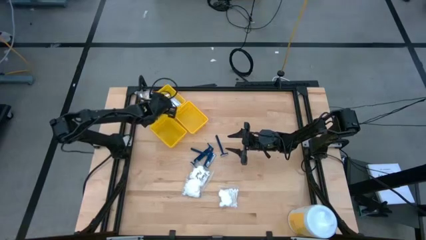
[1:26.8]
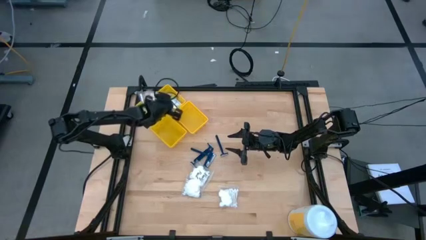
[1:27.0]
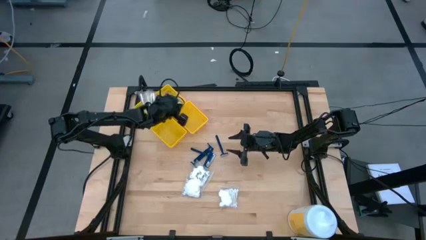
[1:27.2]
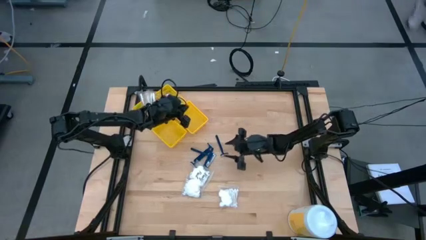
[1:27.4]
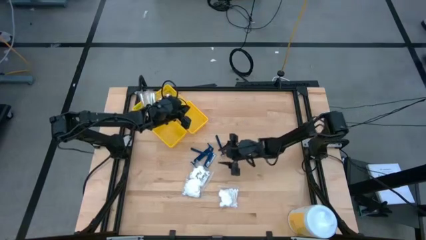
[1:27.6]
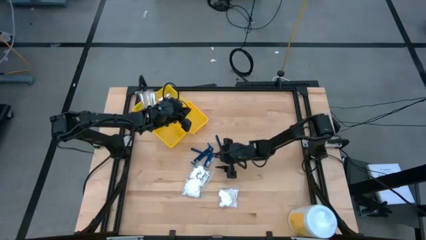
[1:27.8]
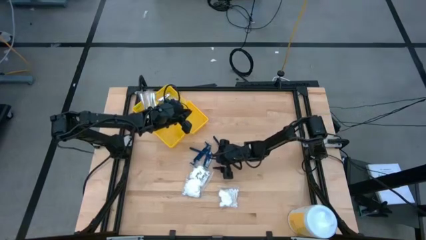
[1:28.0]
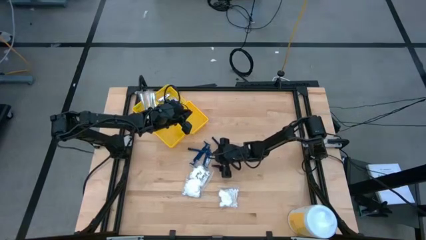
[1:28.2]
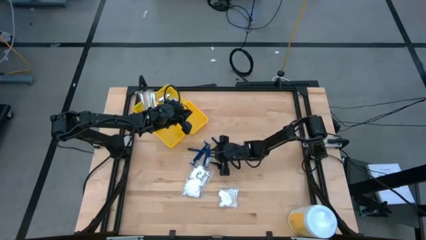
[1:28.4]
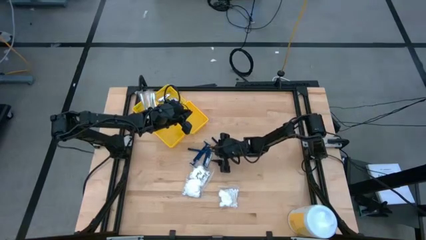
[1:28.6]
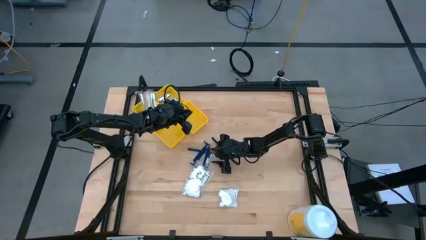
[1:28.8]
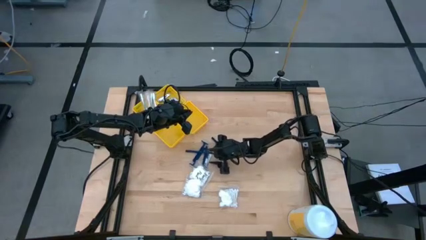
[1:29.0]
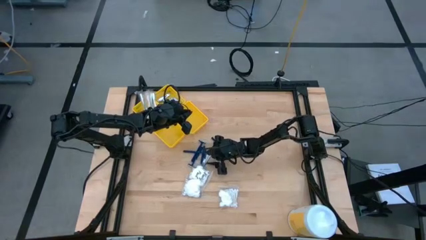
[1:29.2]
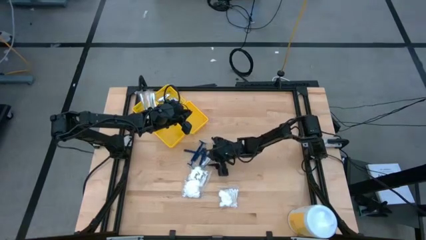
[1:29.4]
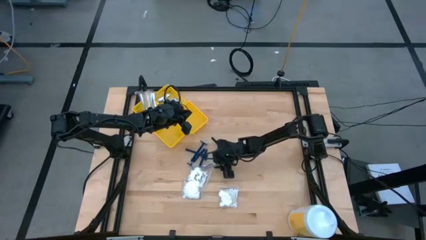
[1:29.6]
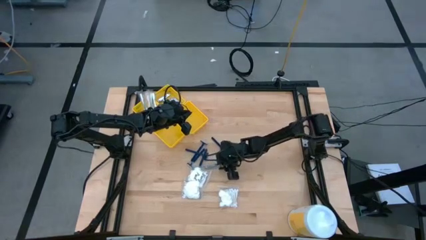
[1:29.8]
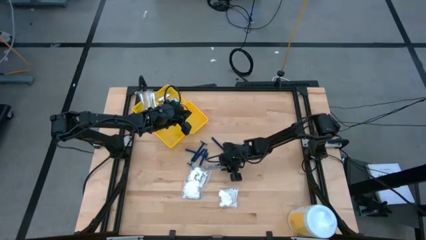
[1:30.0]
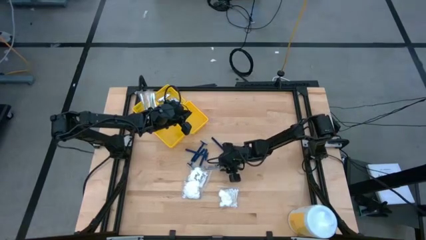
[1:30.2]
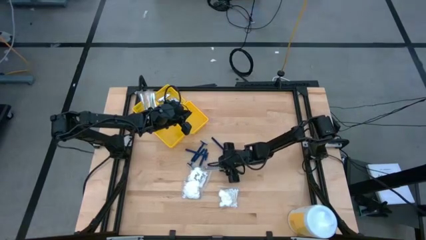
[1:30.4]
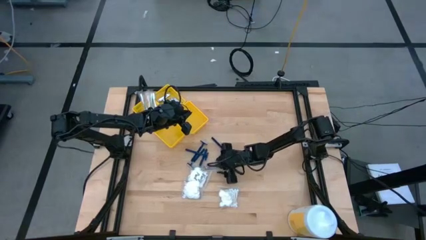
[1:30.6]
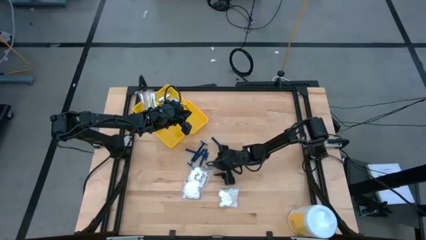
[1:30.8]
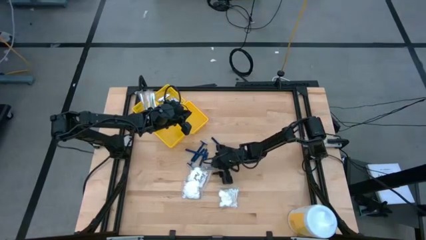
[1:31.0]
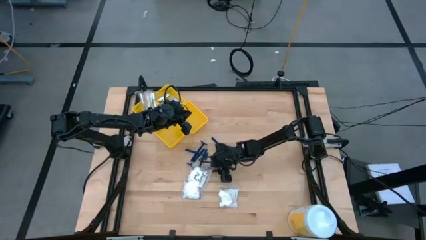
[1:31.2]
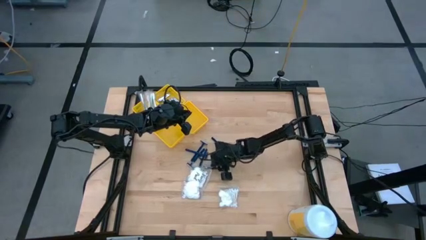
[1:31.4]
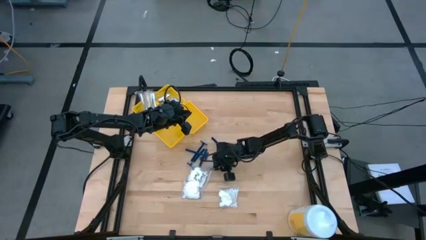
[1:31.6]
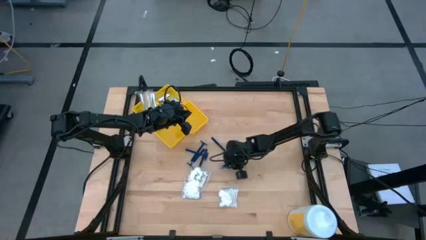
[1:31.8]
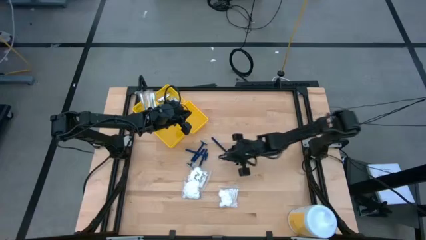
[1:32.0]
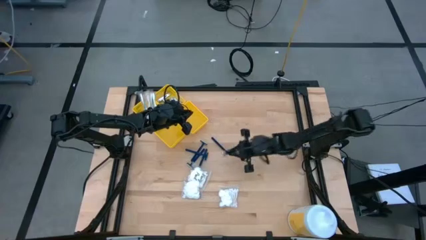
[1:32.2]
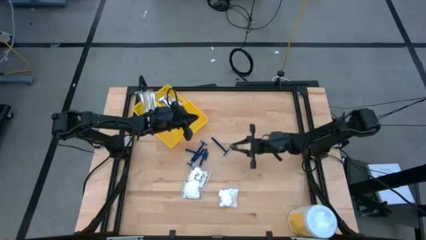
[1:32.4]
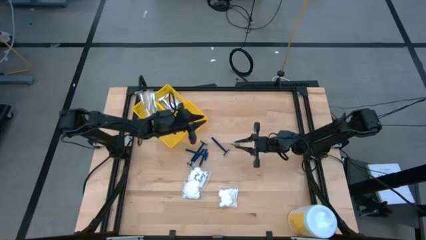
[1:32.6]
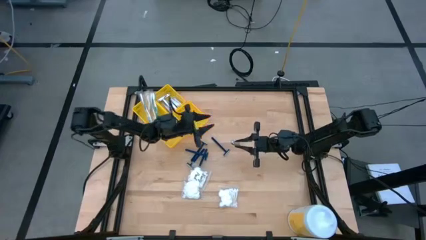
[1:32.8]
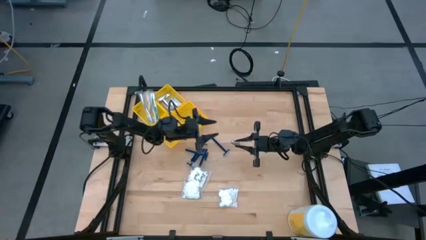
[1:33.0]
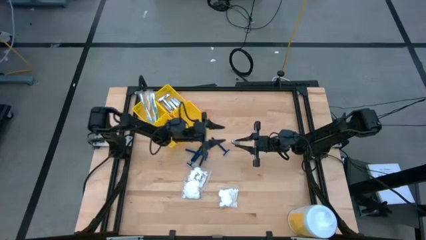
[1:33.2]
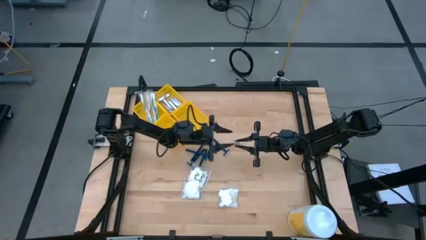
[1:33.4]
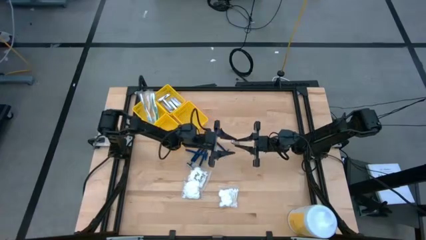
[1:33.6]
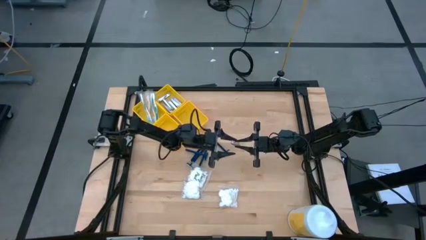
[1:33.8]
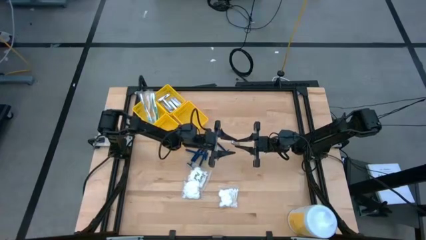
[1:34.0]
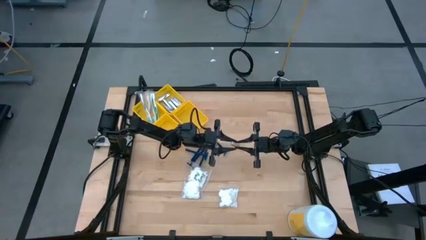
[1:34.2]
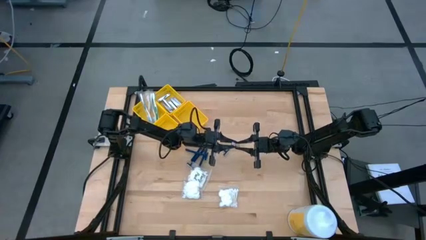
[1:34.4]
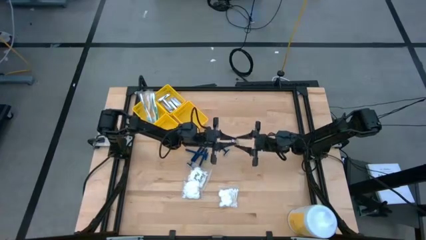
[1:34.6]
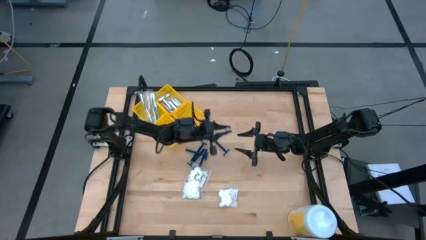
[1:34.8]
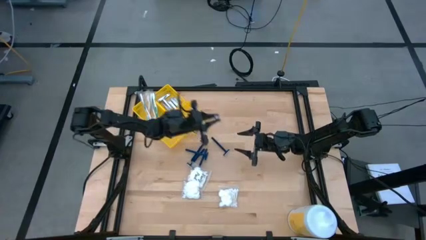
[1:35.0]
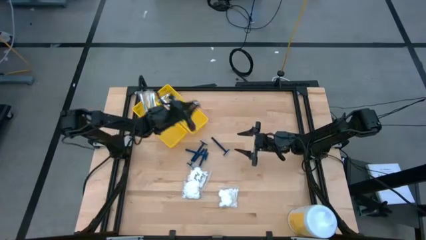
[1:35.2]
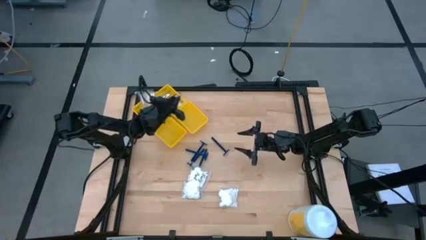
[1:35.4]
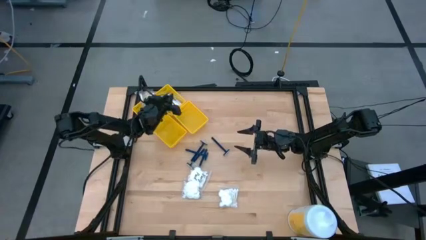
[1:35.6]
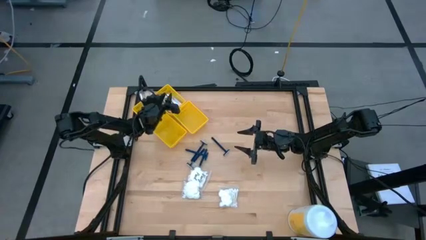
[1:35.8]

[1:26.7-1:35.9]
Task: Pick & Place Travel size toiletries
Put the silver nail cutter into the top yellow bin

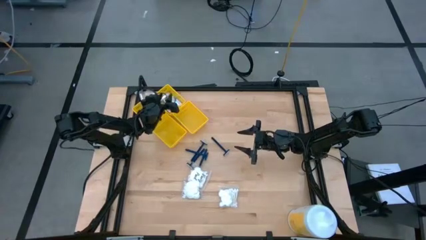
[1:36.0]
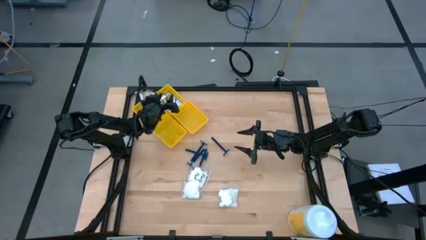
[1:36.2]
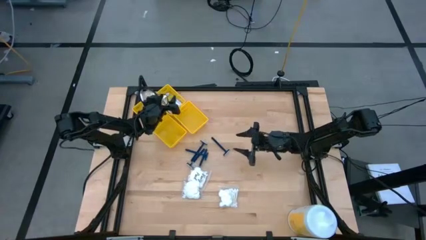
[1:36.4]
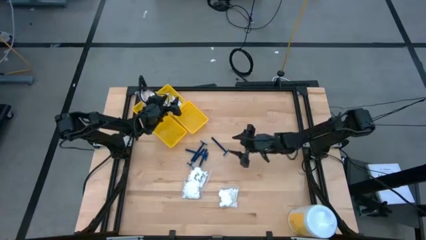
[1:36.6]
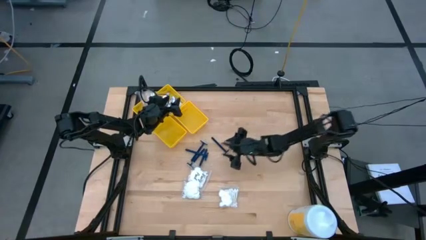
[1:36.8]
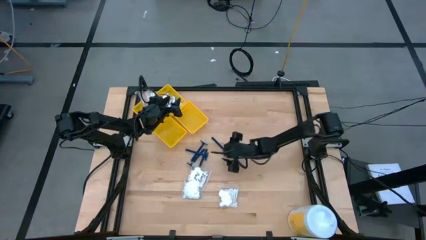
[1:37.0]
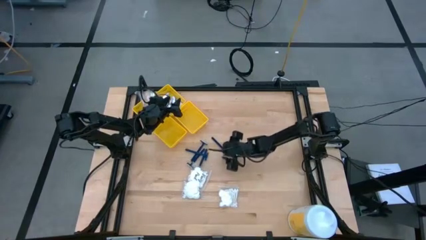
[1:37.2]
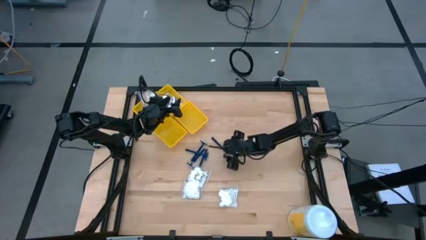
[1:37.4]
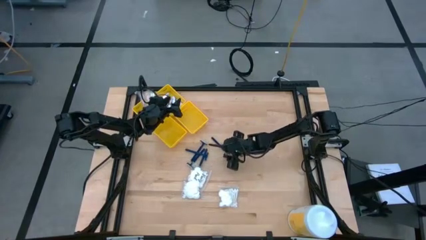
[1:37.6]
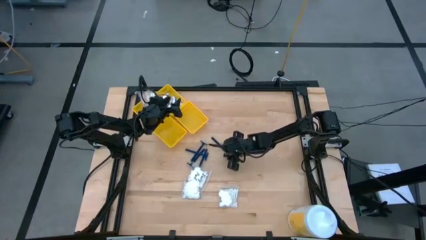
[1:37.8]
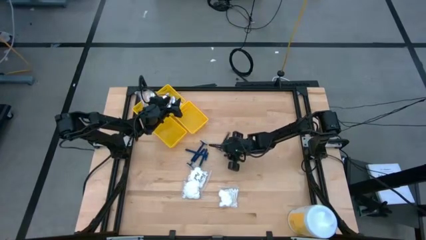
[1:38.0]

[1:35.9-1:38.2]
Put the blue razor into the middle right yellow bin

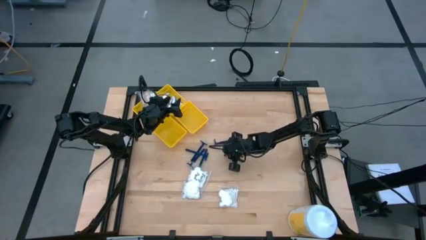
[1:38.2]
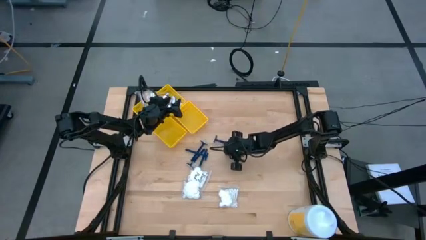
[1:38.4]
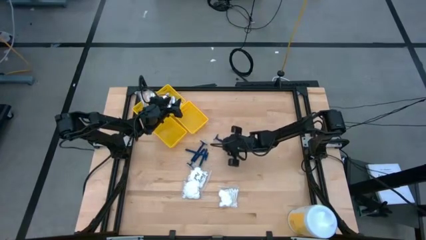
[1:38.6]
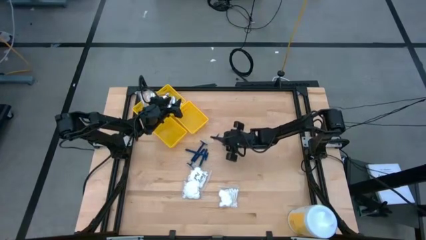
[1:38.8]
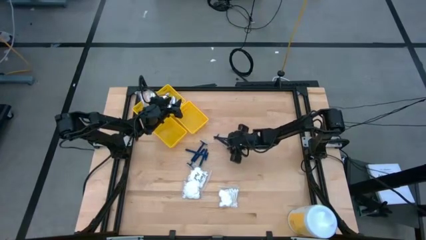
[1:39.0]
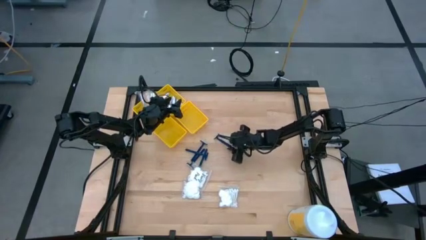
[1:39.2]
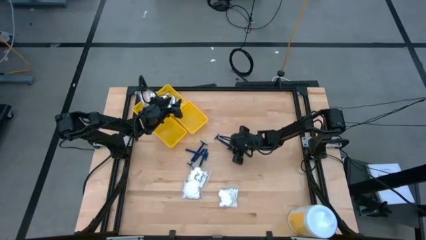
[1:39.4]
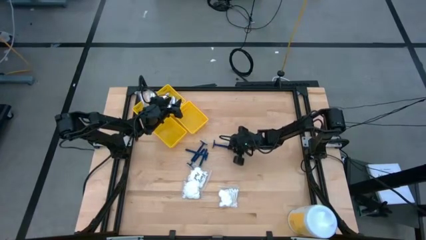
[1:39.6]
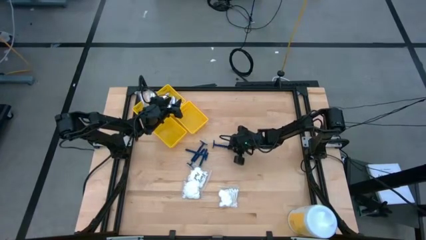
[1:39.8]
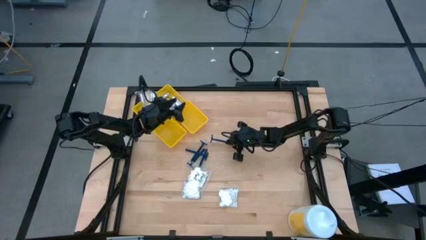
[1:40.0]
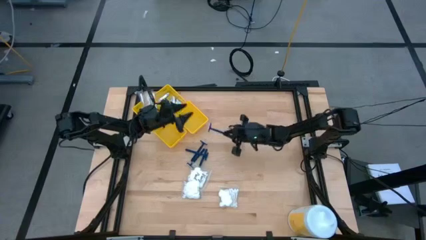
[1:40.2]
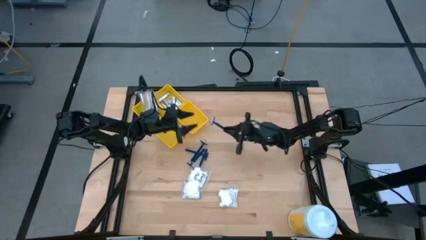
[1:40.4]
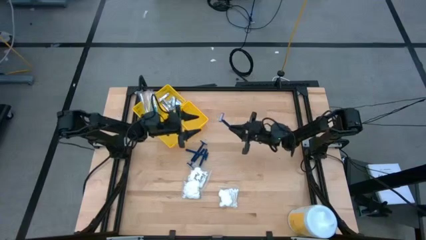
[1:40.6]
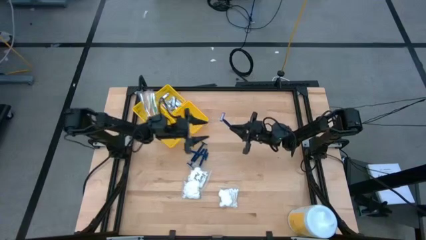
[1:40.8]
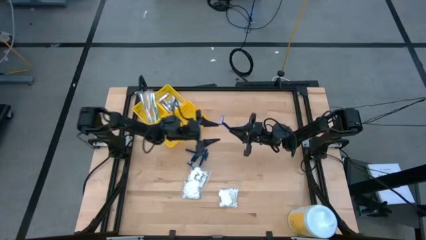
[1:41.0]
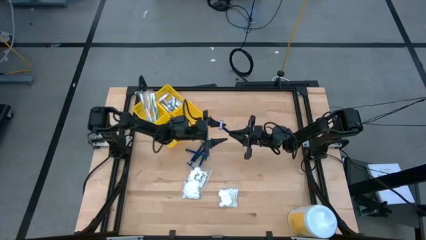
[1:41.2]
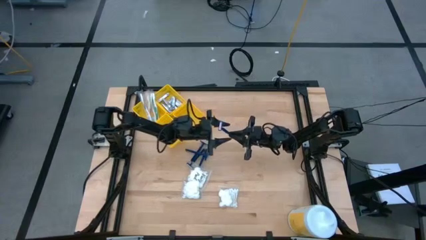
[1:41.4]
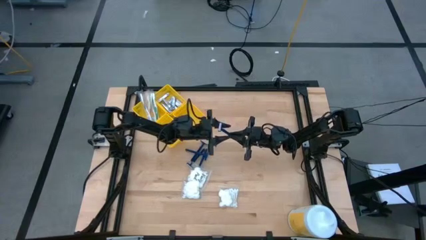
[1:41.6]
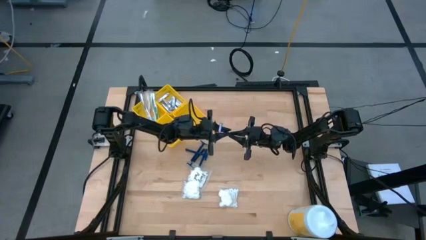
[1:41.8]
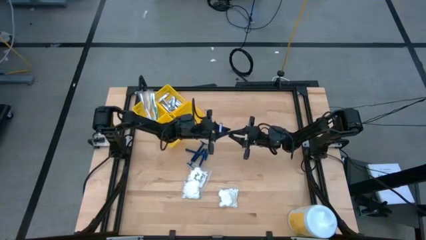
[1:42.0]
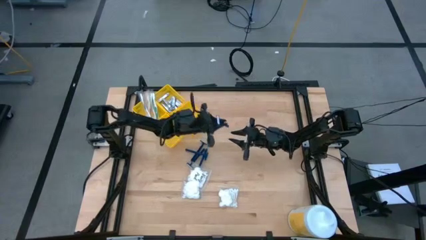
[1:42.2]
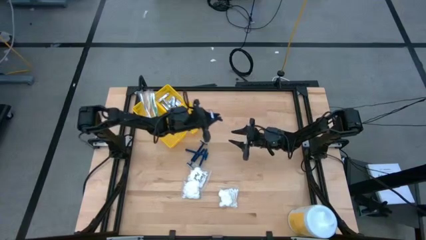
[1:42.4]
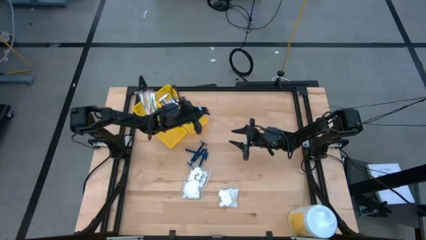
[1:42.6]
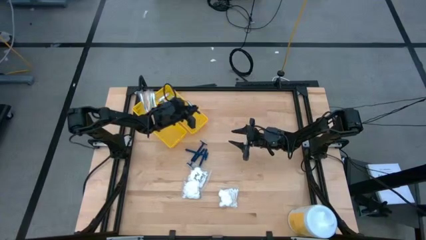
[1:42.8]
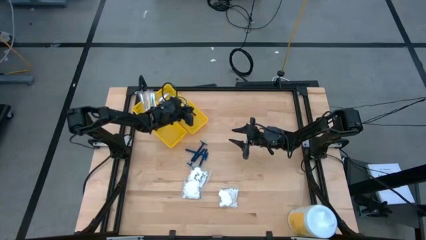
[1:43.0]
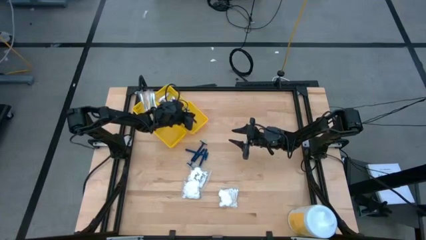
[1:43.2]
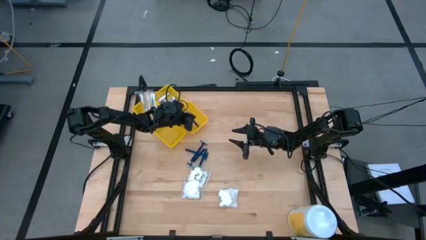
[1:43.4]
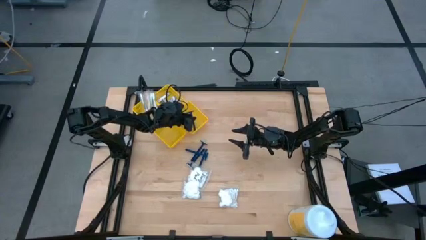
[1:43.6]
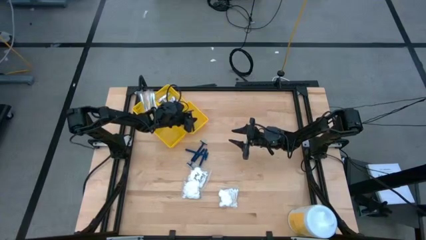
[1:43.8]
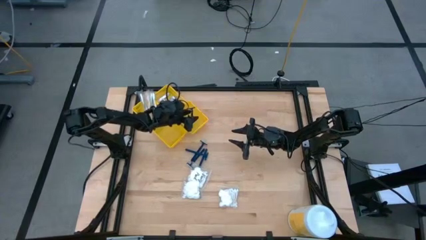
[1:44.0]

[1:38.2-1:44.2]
Put the blue razor into the middle right yellow bin
